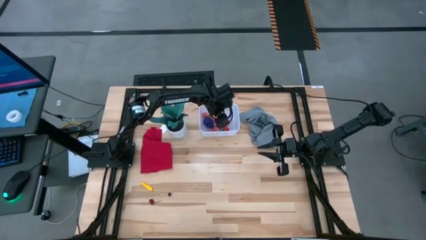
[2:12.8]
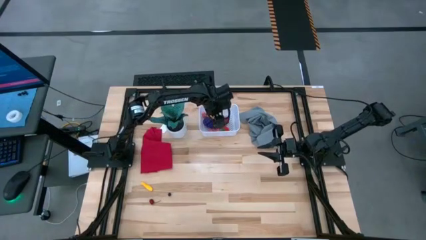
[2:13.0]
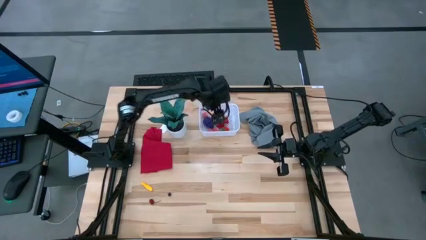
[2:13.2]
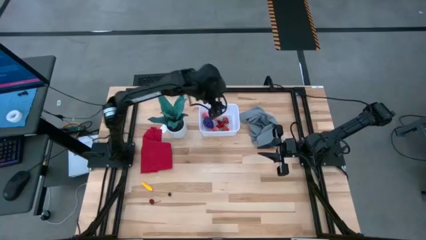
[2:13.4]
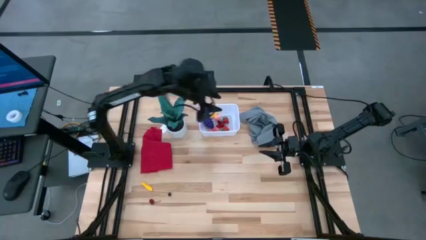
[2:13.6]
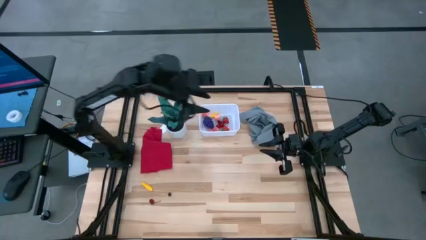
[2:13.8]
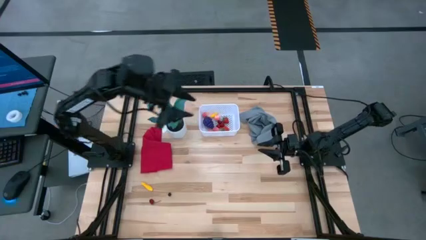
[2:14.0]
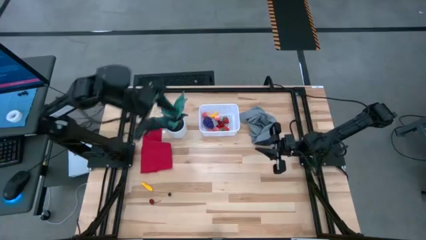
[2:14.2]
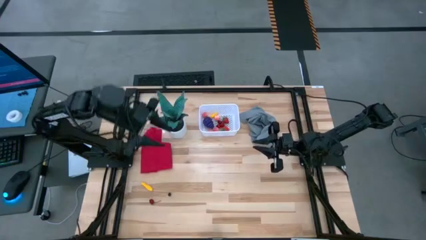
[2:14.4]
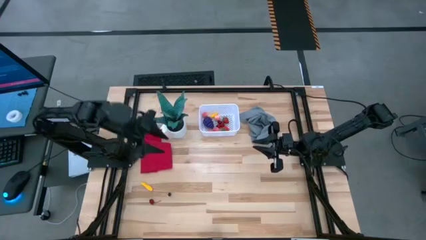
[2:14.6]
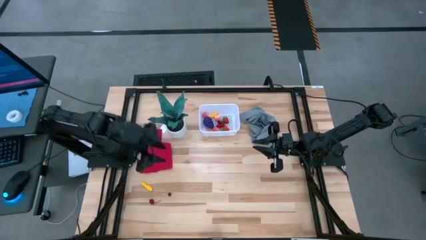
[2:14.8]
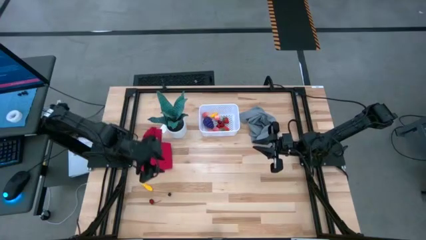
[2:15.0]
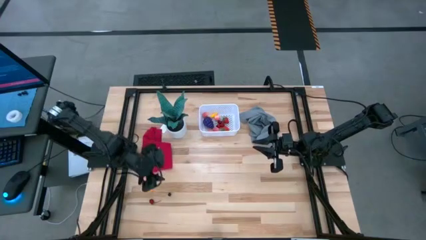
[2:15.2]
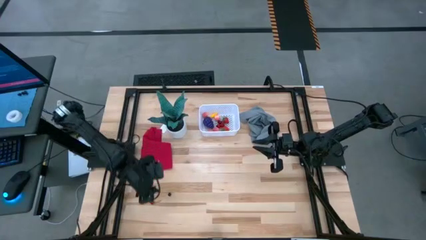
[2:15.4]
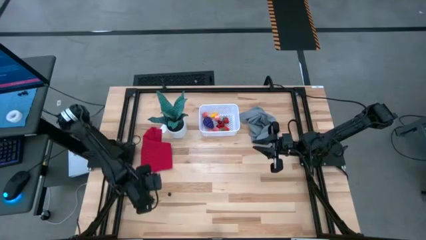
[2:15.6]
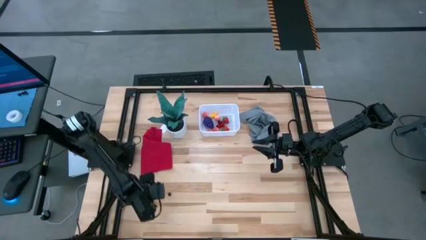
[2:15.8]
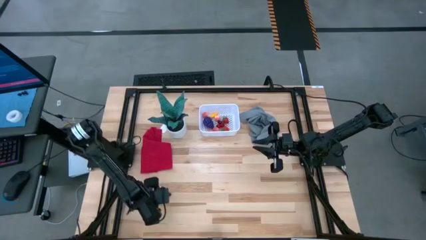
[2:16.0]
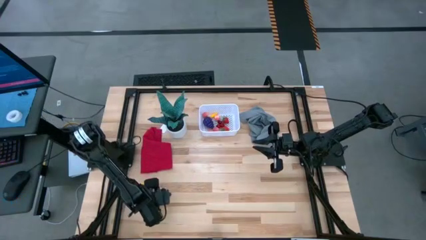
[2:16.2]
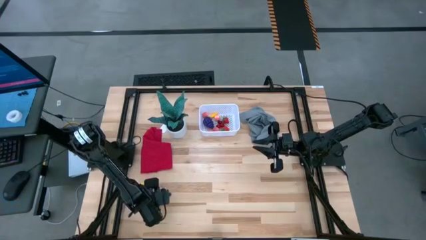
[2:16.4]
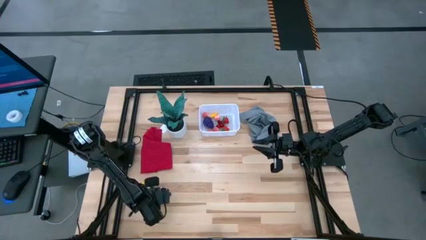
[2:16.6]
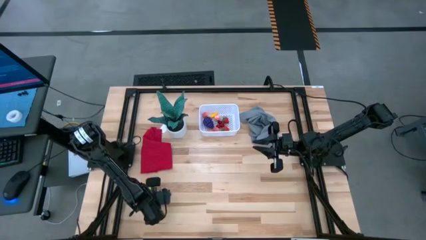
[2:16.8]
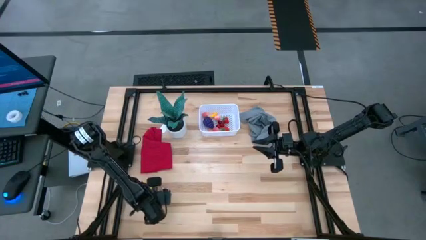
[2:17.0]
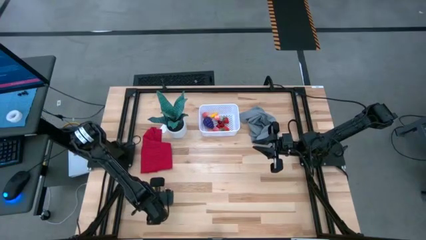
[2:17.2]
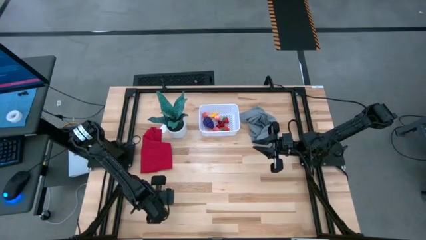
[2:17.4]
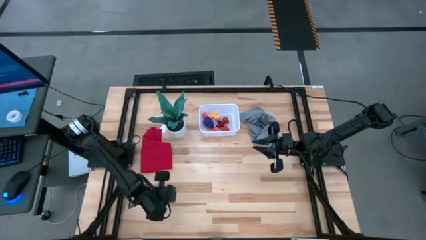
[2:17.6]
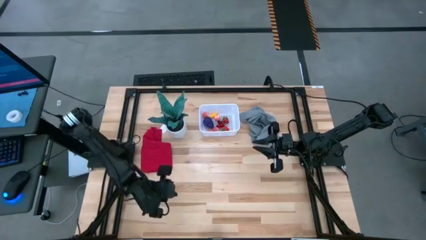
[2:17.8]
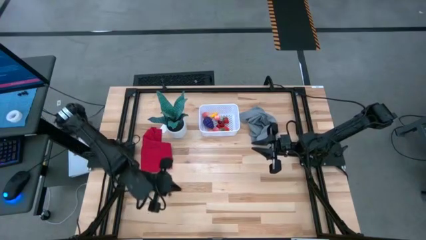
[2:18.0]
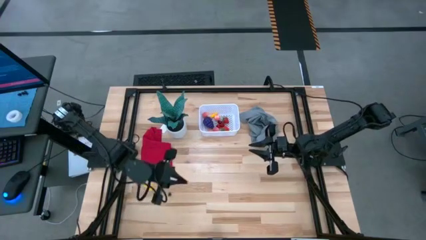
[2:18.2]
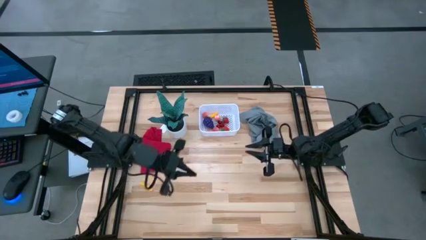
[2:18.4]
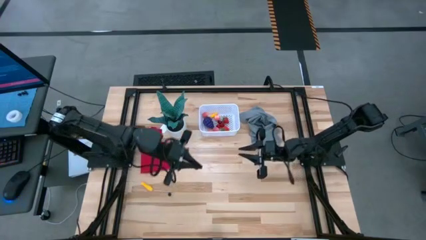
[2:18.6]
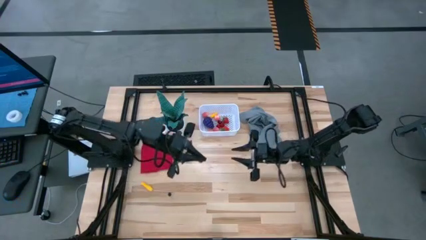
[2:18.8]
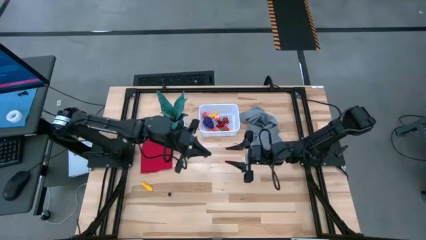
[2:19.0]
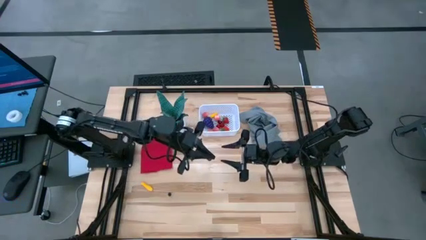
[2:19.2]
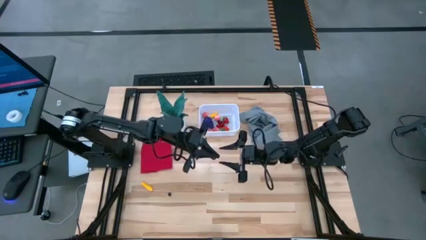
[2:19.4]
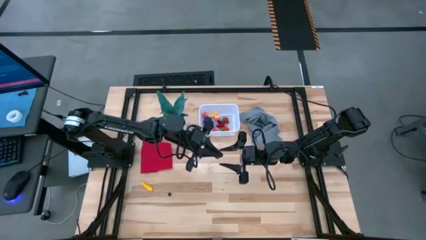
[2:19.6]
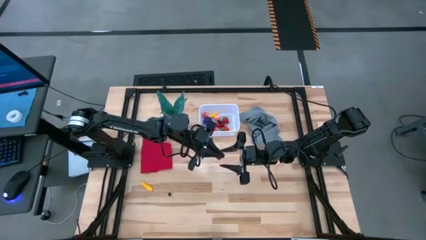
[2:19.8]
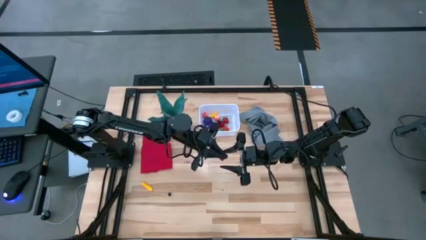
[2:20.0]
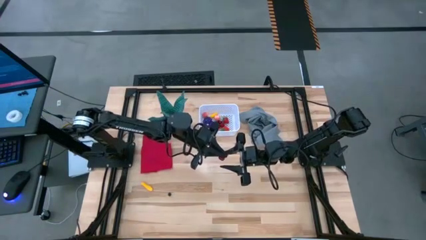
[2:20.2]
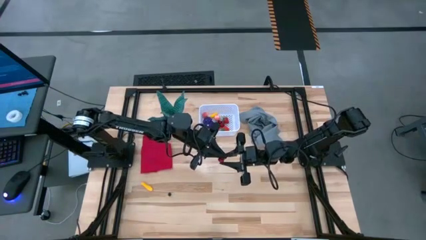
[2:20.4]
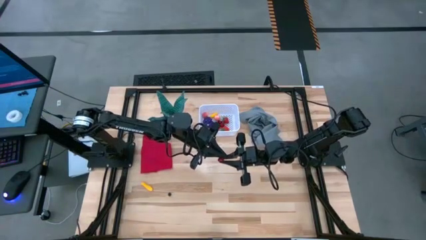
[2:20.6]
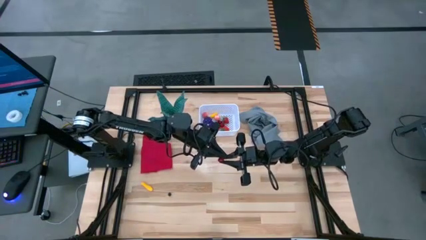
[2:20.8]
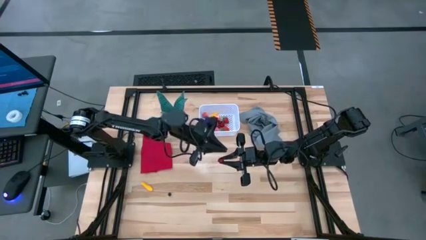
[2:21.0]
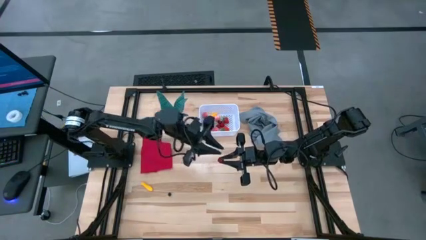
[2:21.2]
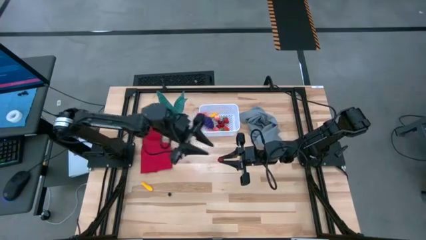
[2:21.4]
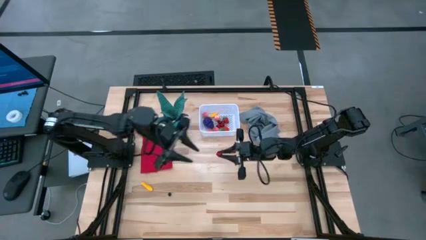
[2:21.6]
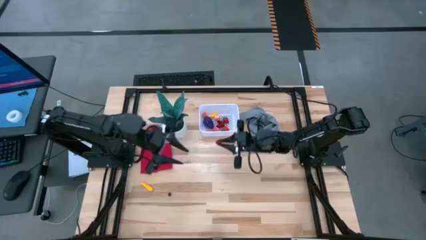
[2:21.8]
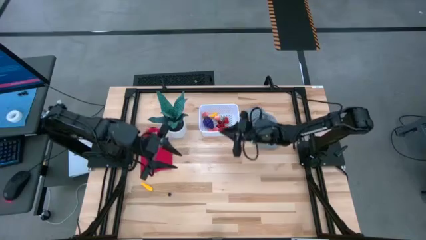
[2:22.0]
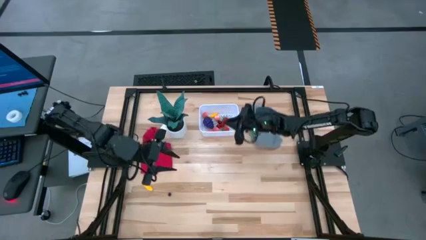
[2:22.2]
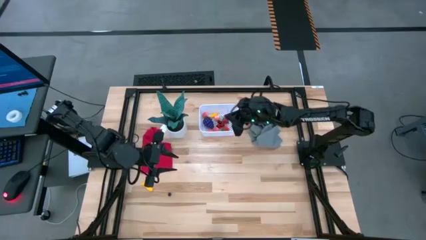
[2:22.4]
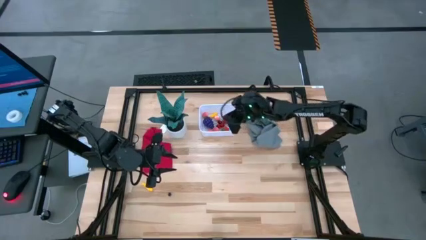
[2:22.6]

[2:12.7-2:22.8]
Task: Pick and placing Produce into tupperware
Put the red cherry into the white bin

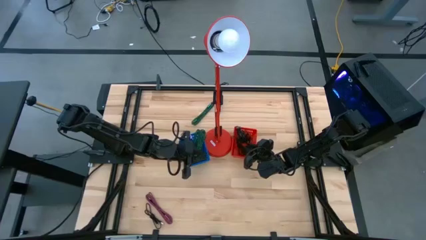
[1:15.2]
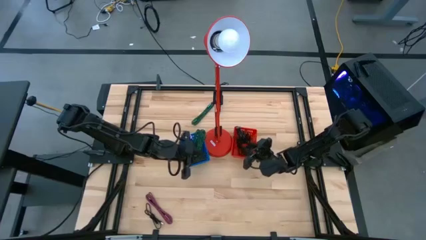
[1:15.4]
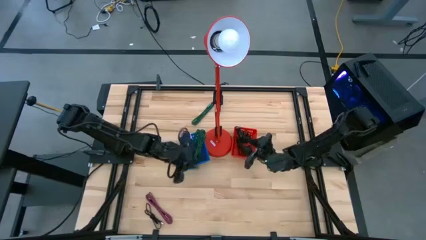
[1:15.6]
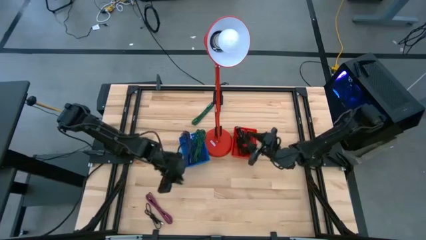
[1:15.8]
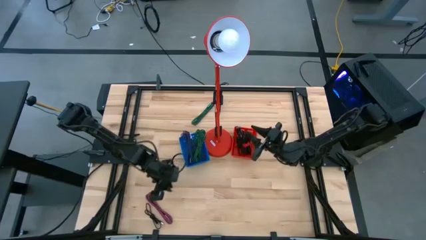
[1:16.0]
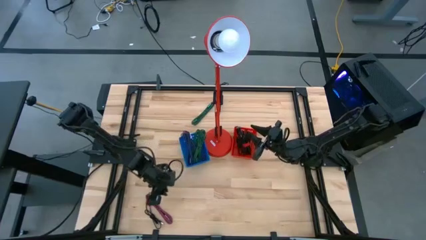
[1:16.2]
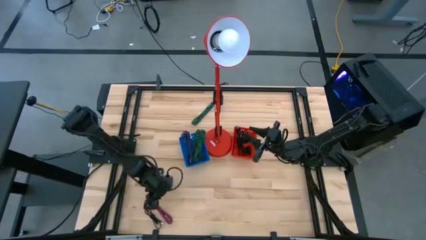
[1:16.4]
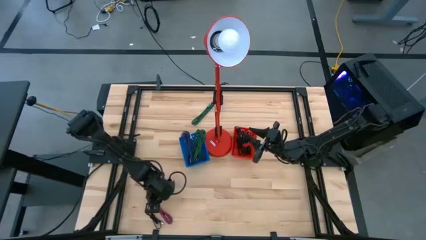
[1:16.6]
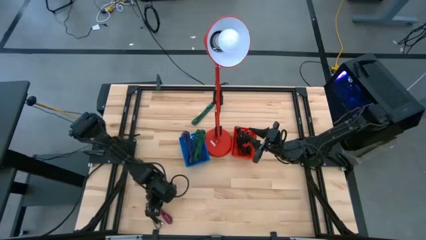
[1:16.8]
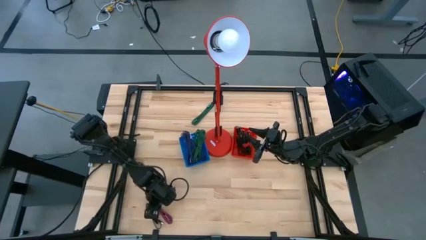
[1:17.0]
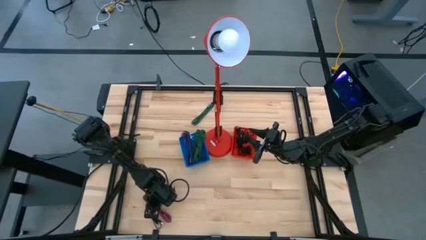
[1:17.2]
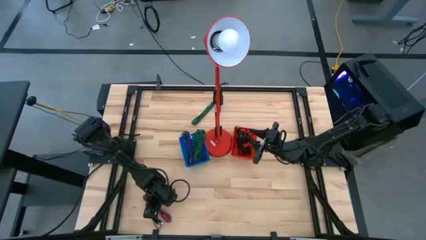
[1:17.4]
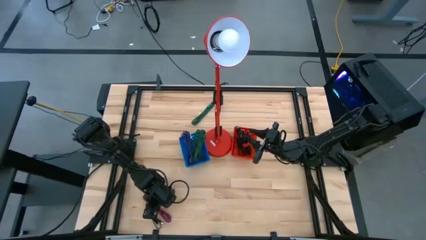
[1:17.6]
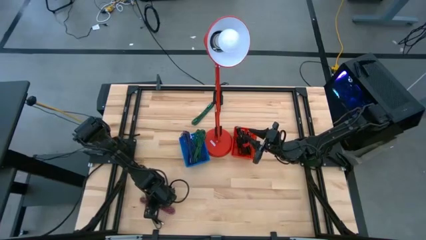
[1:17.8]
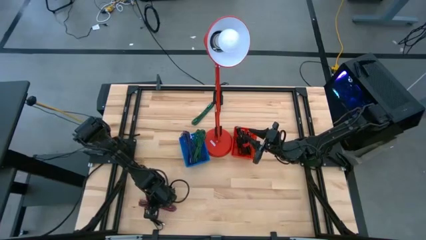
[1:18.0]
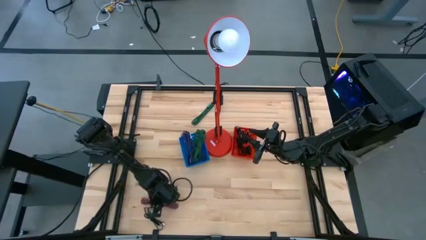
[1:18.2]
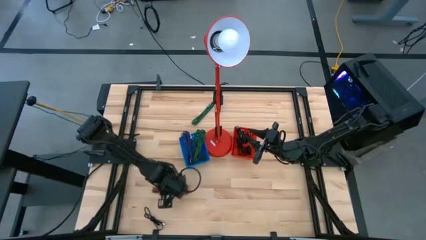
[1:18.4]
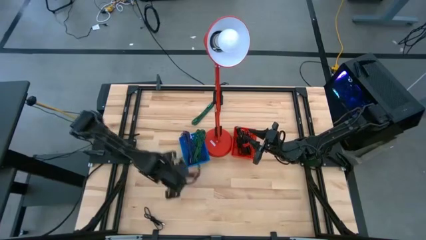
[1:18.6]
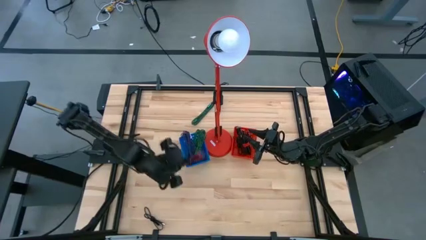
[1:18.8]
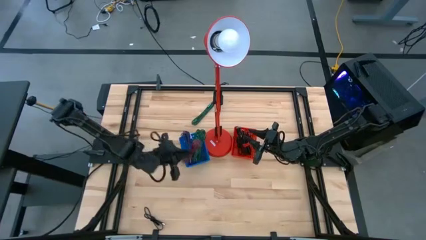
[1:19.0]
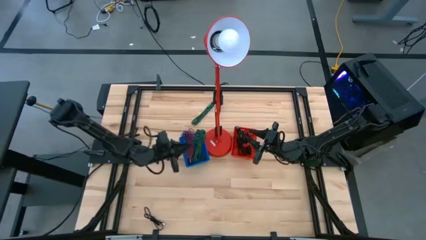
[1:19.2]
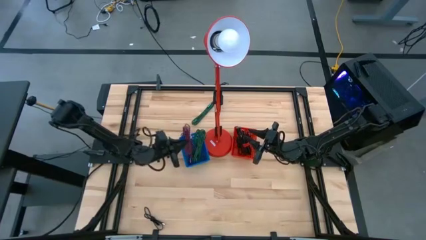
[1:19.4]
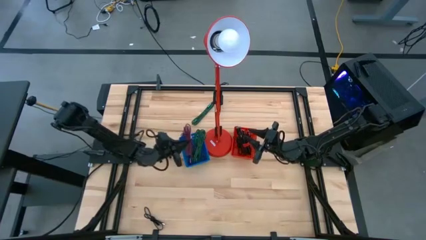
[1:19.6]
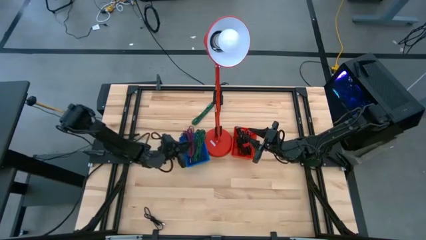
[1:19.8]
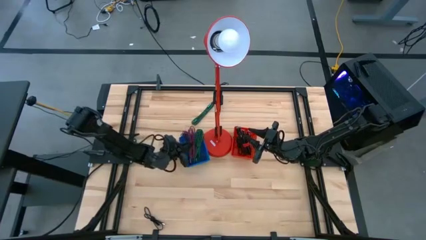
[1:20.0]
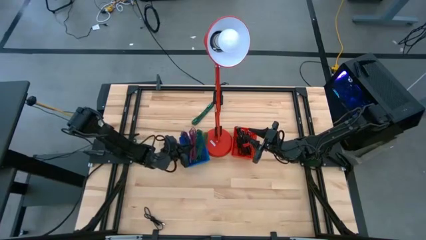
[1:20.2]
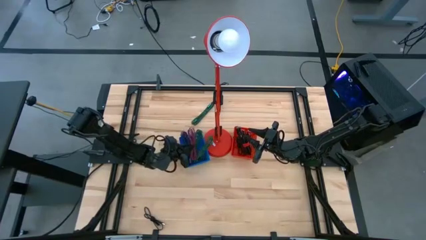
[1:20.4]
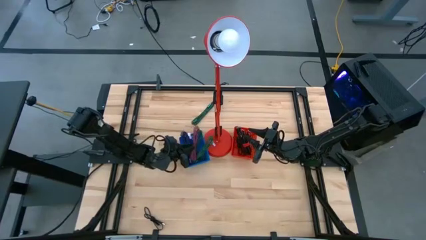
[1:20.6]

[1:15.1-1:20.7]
Task: Pick & Place USB Port
Put the pink charger cable into the blue bin
